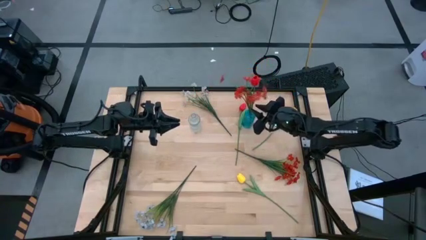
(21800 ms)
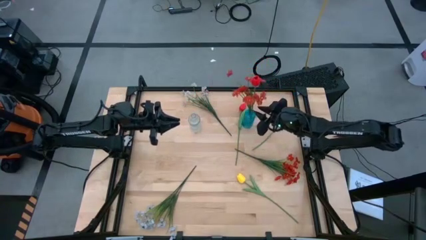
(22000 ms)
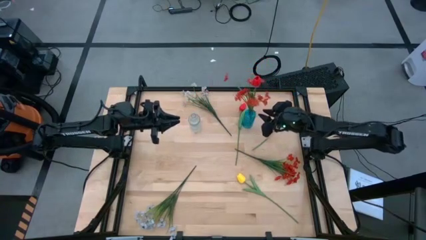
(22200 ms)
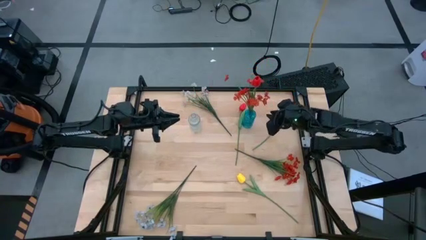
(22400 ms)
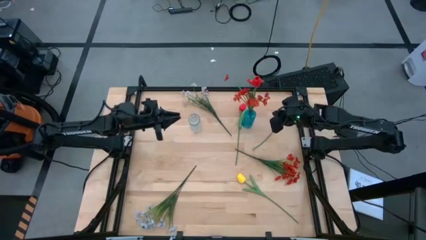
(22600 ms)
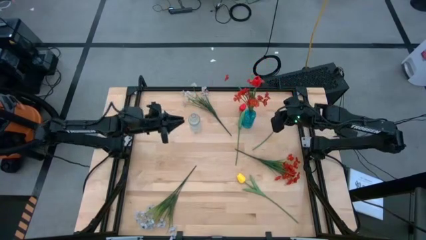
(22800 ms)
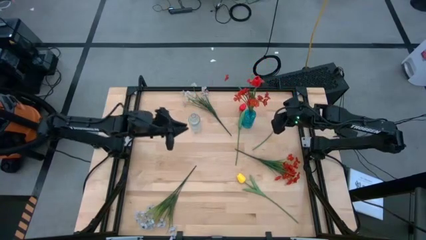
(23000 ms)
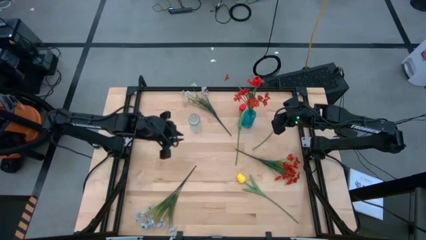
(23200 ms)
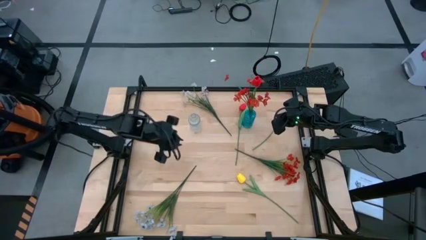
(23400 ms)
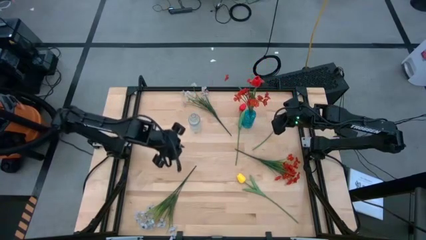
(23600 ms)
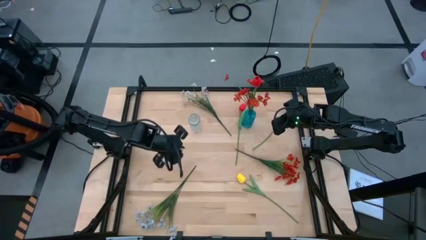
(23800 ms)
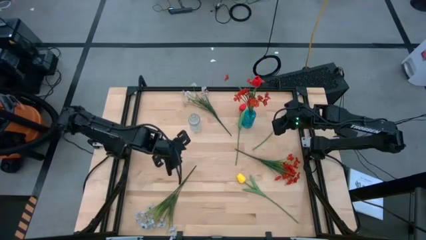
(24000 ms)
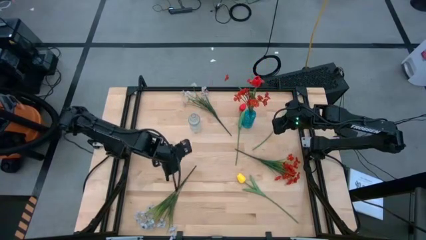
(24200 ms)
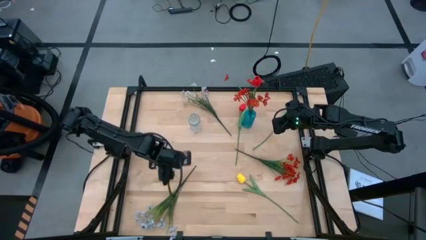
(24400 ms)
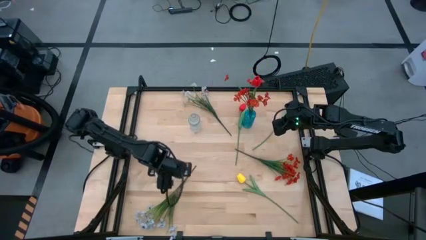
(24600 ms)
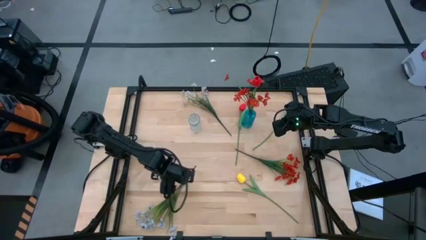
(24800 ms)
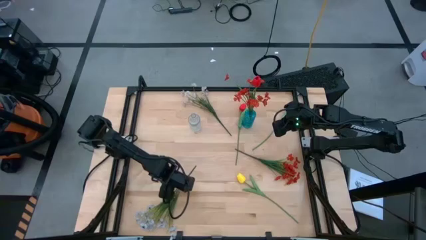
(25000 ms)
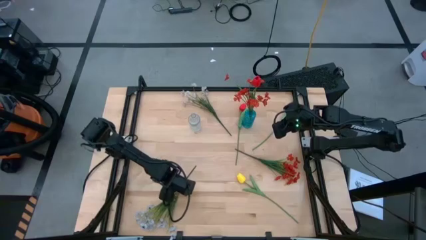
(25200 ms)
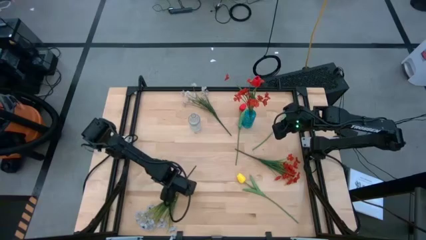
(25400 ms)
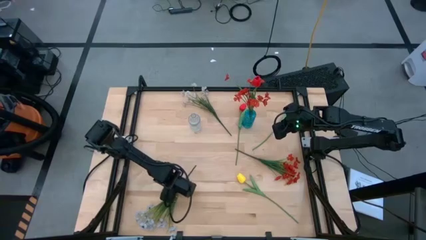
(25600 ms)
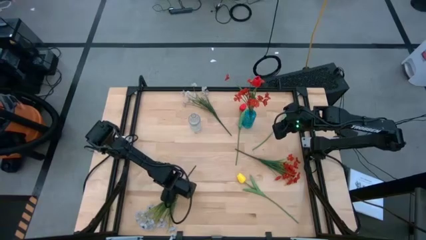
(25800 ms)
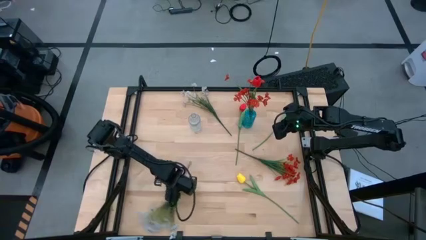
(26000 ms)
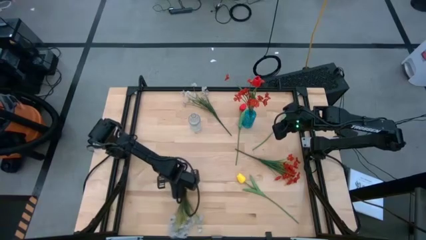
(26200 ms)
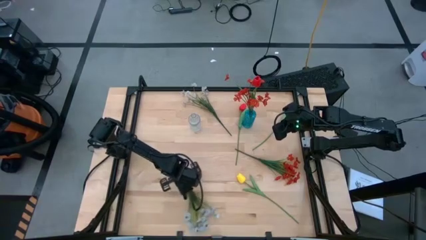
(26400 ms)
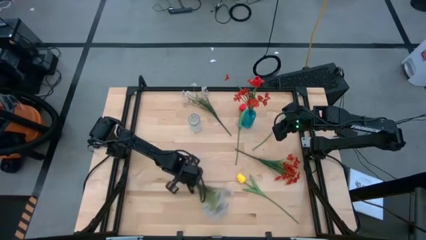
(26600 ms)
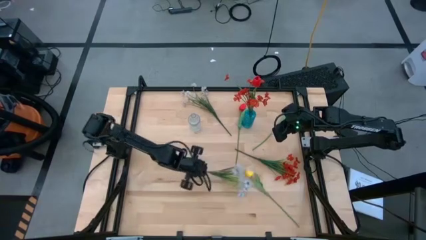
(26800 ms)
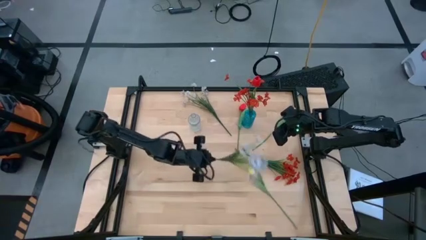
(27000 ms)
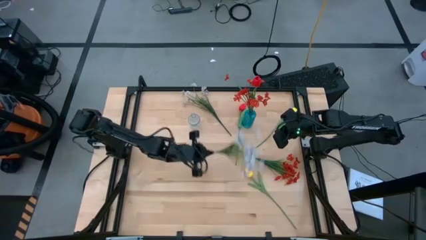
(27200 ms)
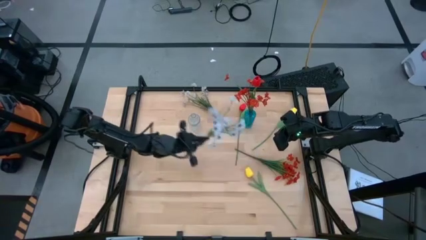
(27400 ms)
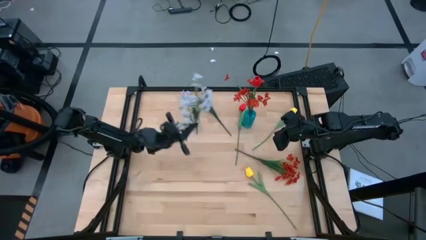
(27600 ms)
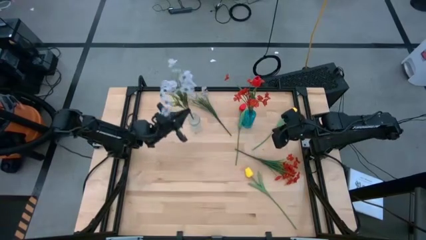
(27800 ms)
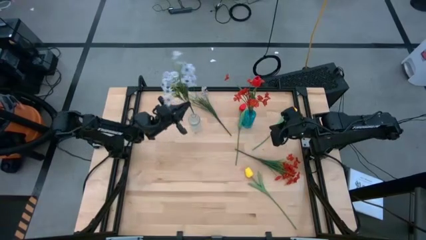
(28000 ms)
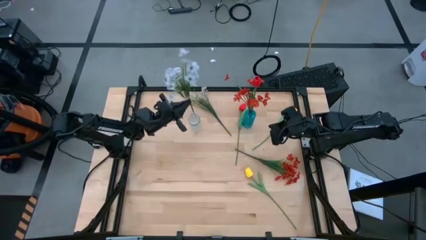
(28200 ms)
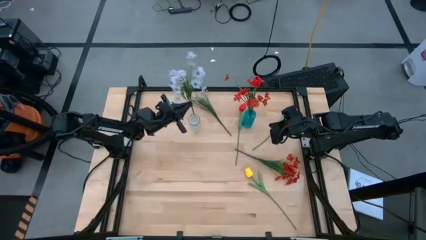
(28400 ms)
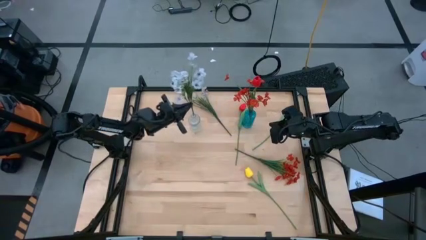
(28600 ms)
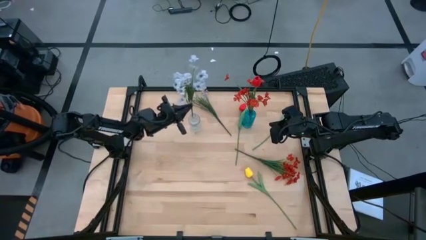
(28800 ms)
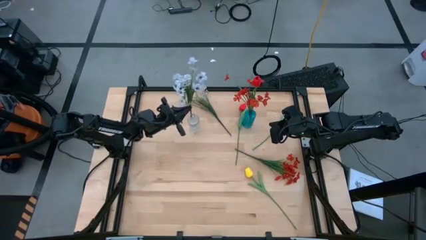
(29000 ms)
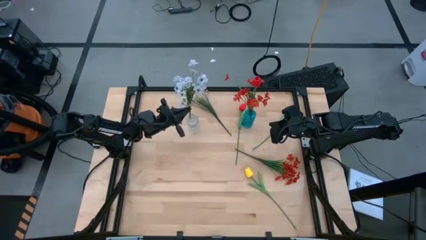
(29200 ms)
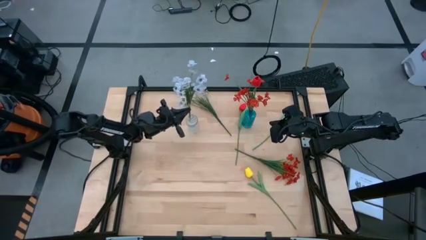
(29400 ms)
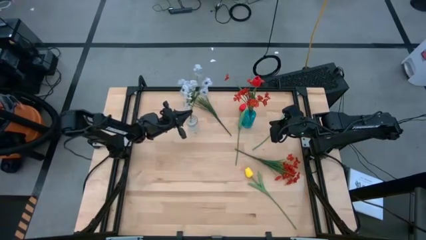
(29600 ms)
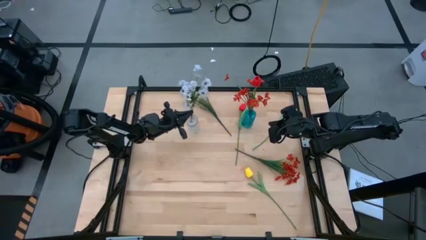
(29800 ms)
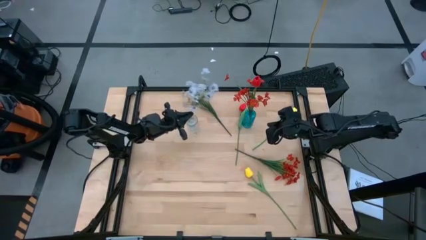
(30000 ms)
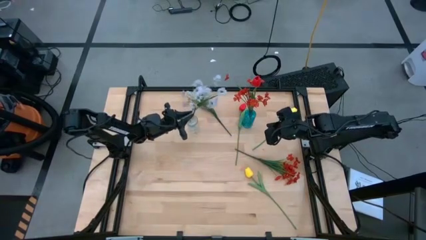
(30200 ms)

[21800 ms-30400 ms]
Task: Sort flowers into vase by color
Put the bottom white flowers into the transparent crystal vase

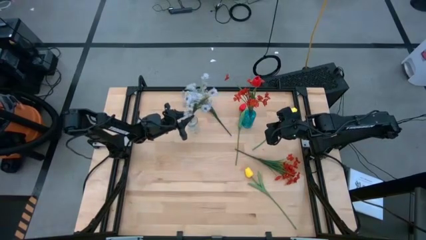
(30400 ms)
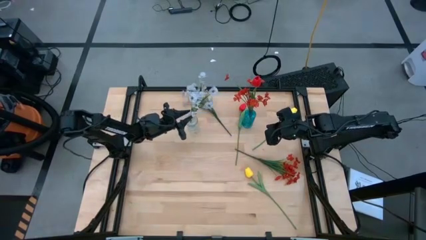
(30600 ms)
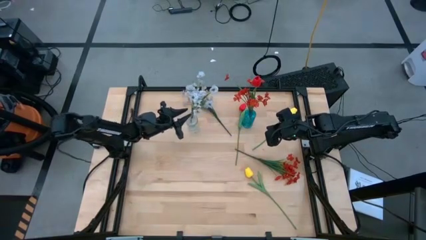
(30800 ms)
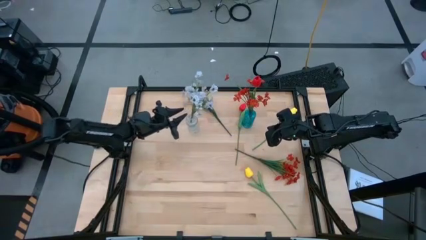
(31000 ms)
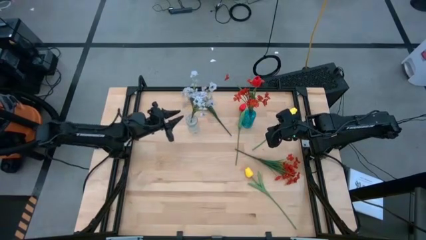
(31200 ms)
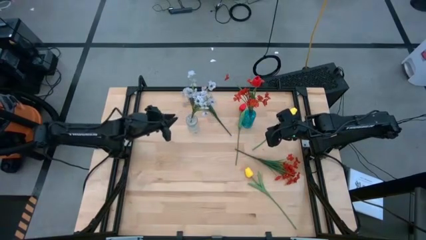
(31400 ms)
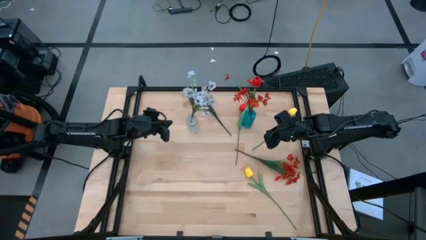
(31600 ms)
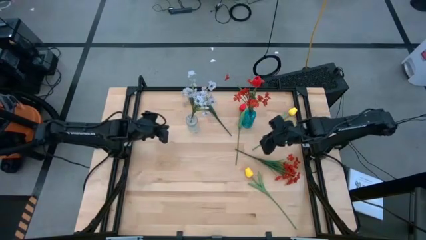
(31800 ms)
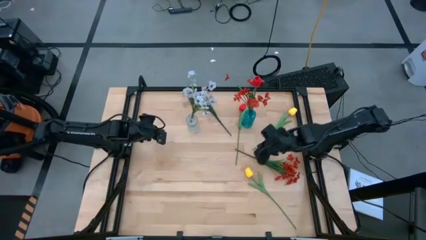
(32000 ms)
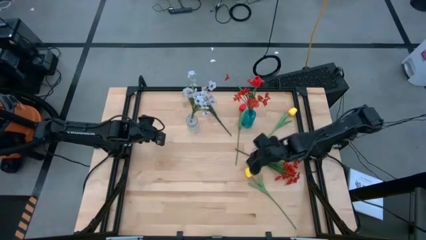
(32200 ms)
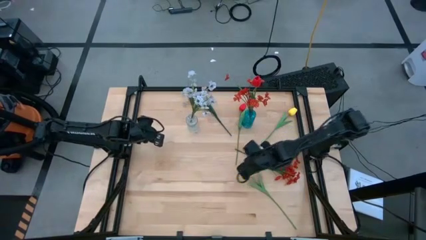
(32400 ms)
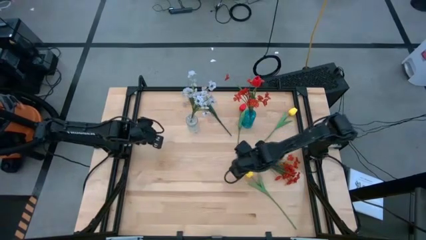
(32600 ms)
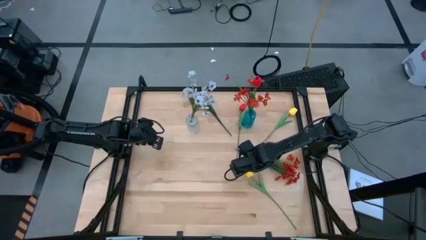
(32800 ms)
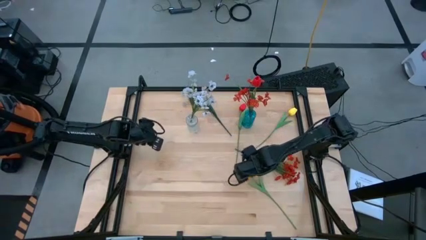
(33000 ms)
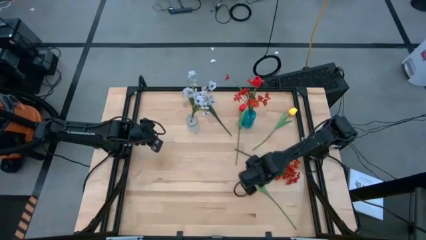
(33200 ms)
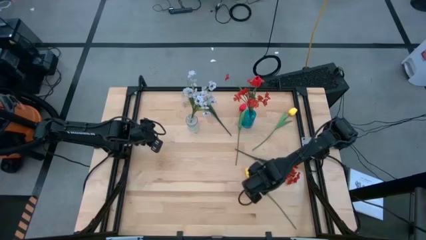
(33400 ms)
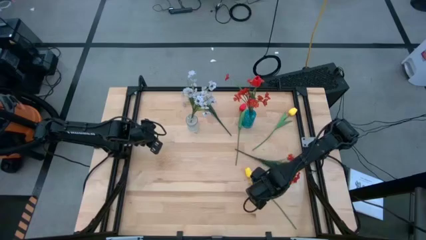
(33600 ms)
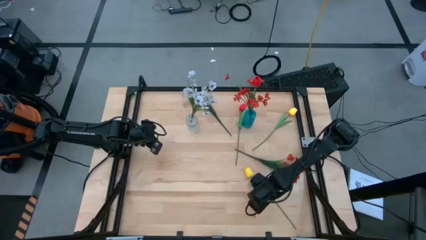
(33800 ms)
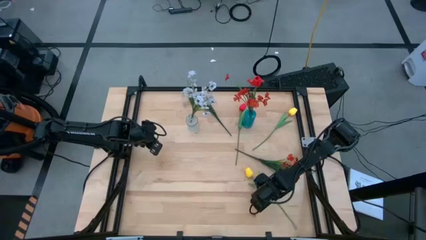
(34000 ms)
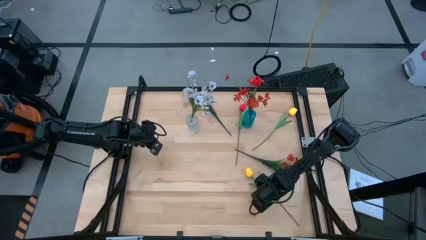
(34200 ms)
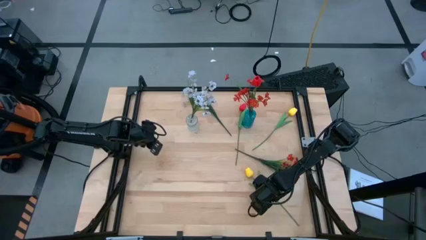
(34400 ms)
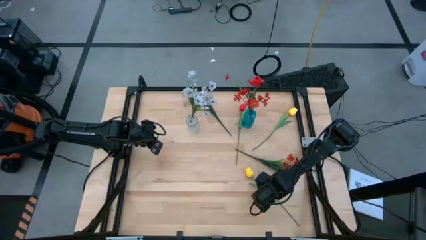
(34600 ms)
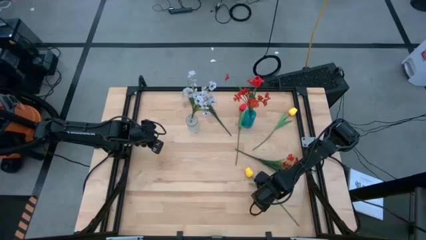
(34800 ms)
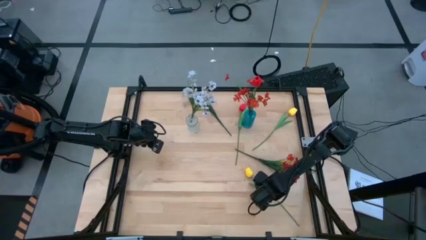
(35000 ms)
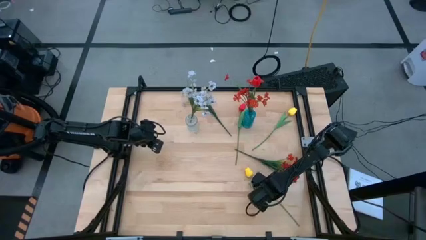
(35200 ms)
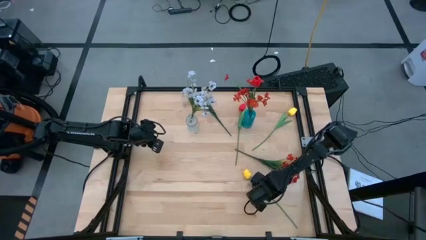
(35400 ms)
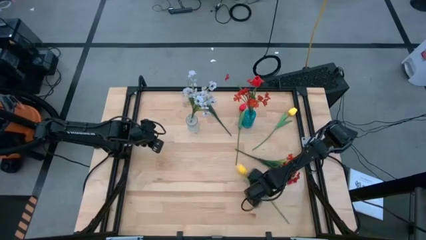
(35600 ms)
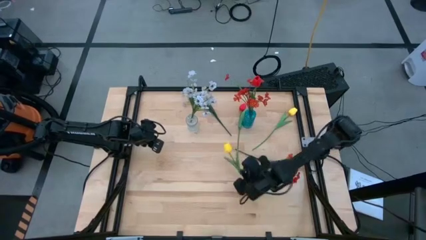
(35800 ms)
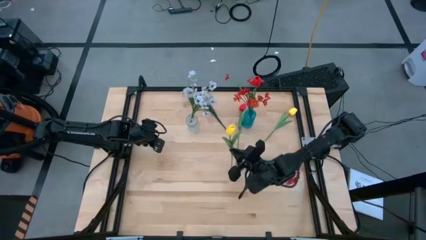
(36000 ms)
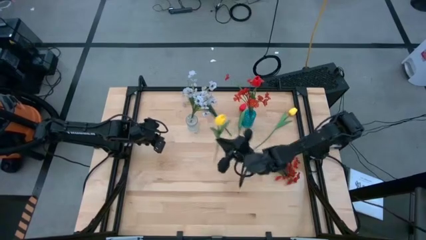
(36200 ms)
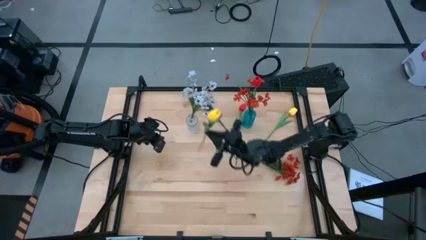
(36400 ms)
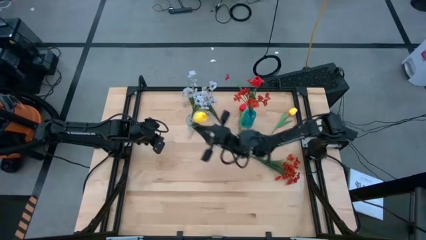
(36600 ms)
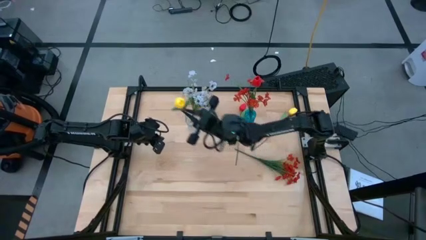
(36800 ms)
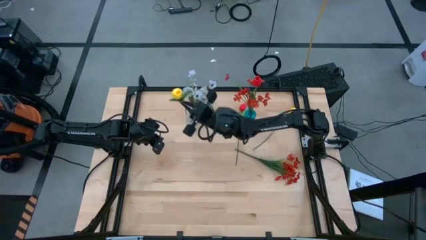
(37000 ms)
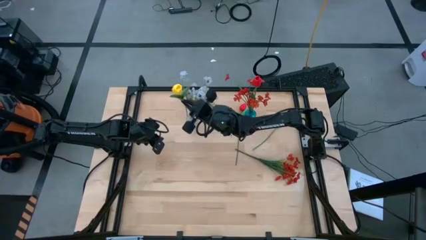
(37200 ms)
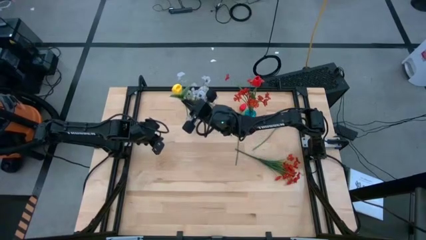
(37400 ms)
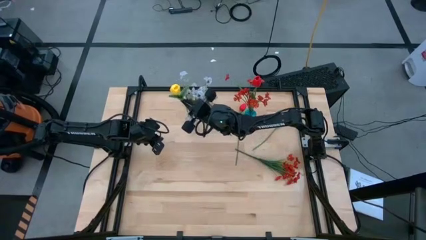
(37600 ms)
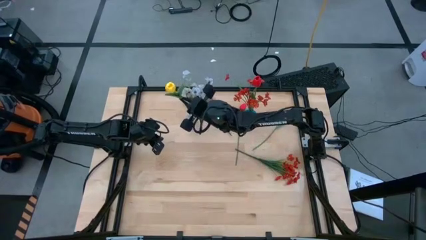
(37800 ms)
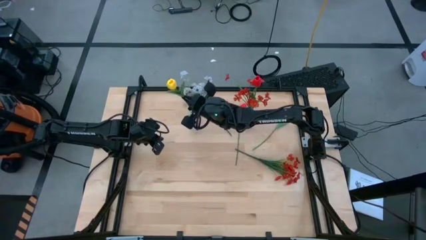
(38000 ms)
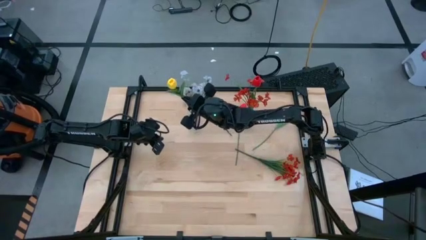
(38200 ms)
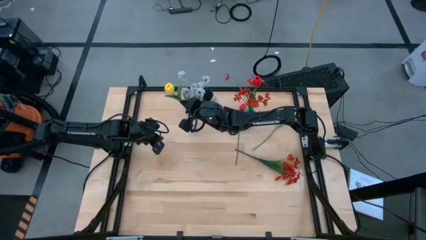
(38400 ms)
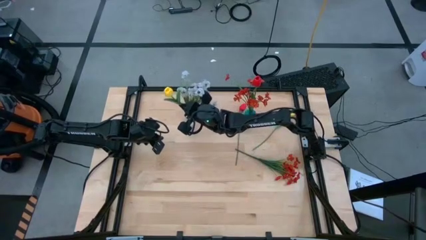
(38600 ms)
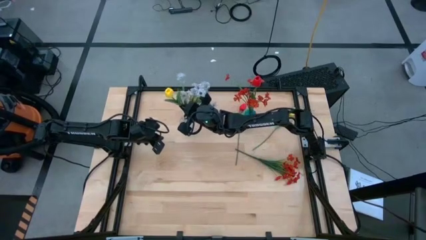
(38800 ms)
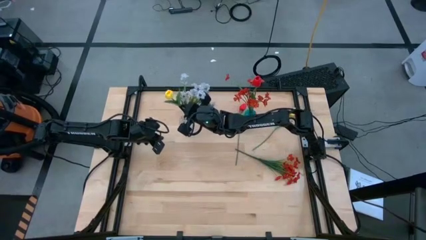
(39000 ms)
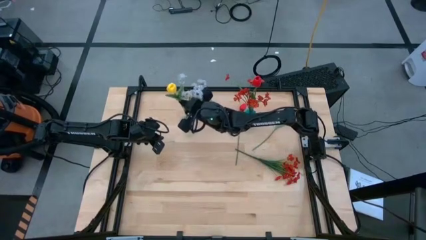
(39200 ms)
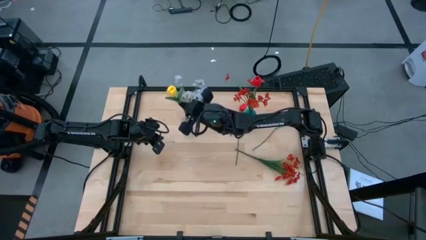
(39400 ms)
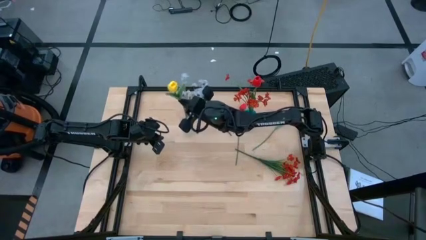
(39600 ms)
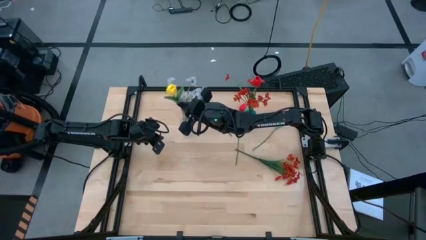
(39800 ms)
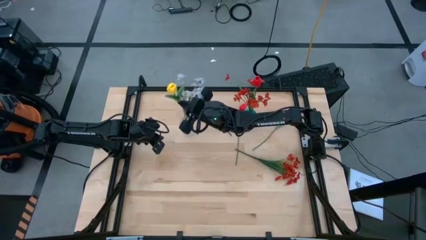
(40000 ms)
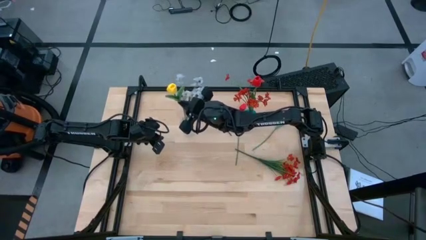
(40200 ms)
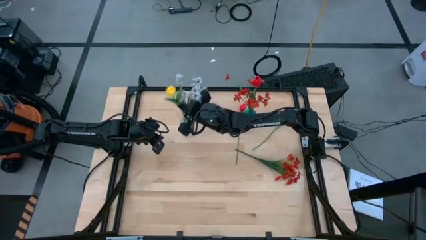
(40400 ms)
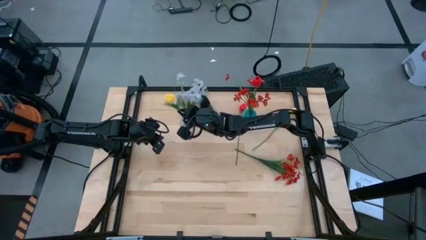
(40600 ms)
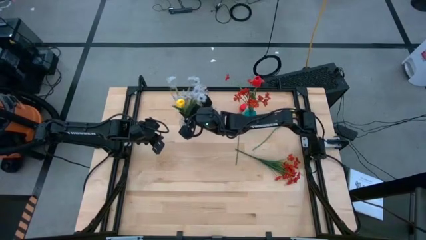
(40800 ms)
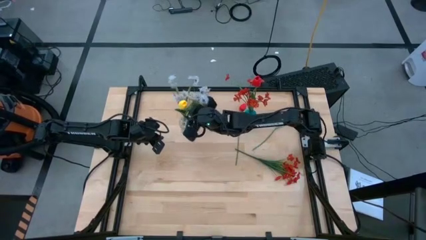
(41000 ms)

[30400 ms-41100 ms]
Put the bottom yellow flowers into the transparent crystal vase
